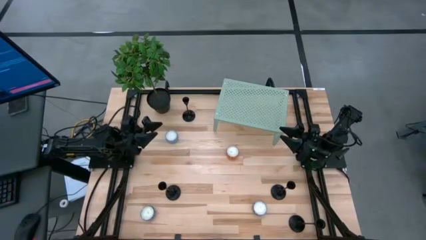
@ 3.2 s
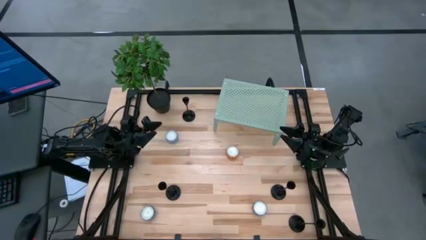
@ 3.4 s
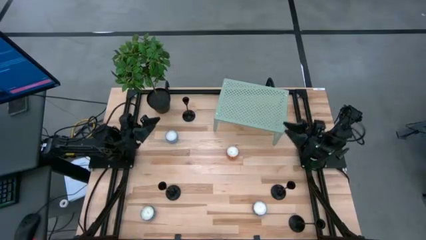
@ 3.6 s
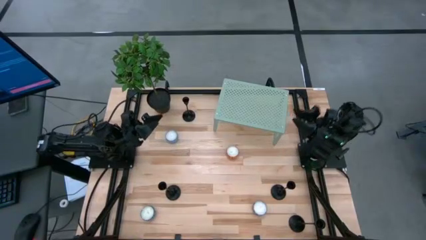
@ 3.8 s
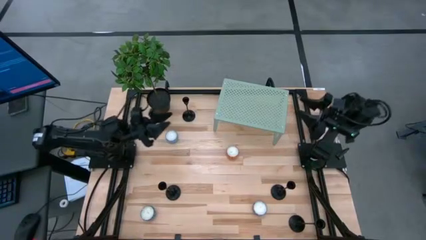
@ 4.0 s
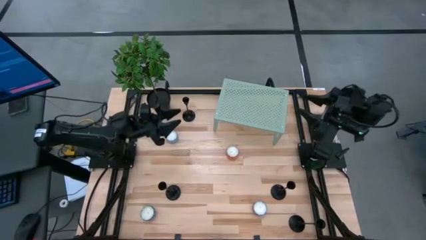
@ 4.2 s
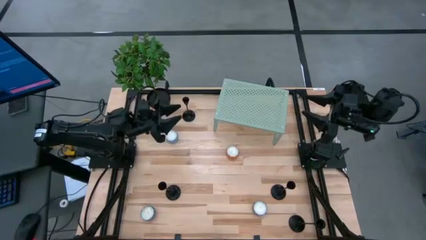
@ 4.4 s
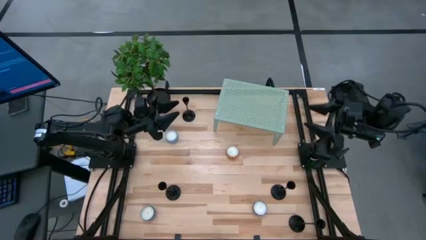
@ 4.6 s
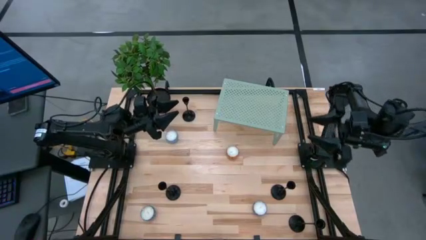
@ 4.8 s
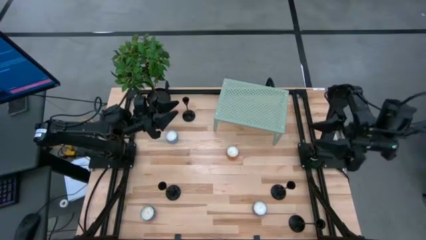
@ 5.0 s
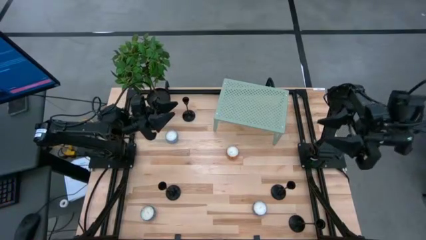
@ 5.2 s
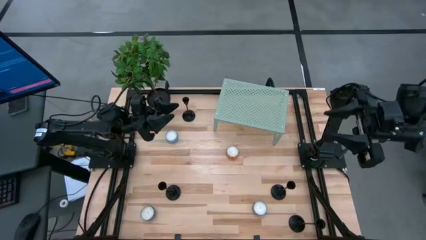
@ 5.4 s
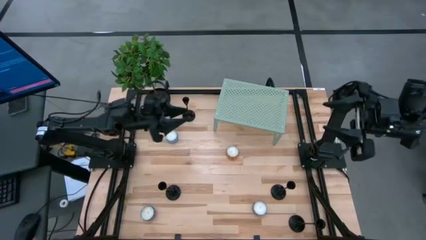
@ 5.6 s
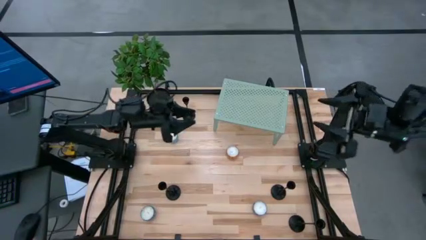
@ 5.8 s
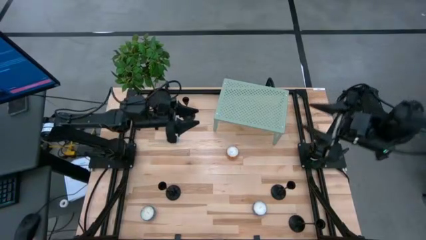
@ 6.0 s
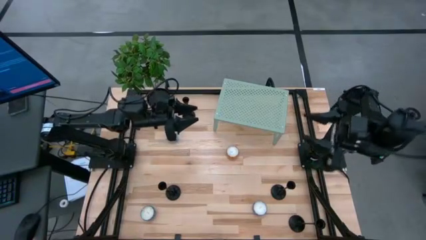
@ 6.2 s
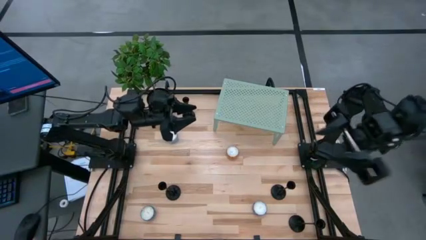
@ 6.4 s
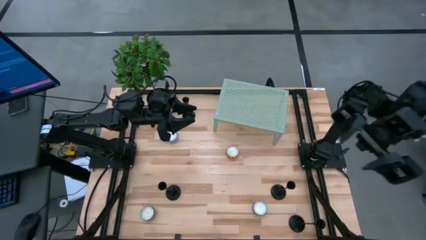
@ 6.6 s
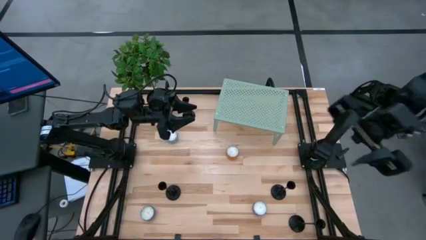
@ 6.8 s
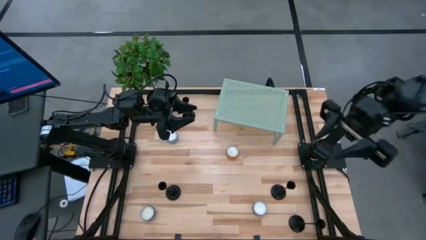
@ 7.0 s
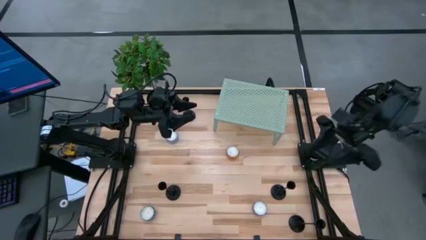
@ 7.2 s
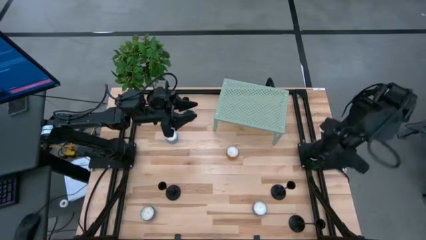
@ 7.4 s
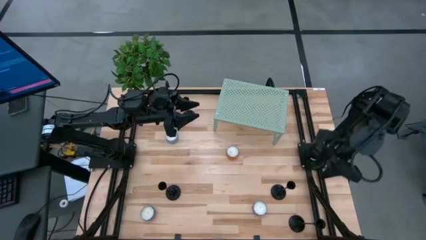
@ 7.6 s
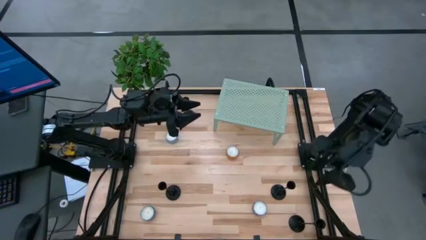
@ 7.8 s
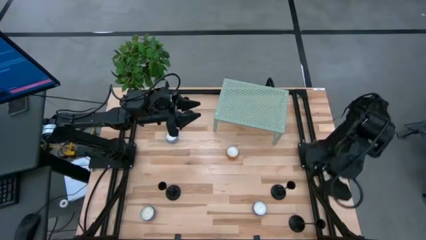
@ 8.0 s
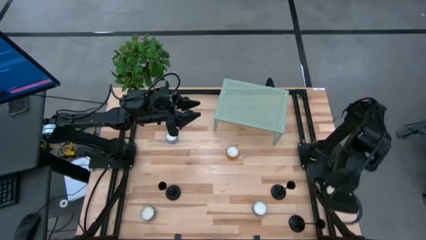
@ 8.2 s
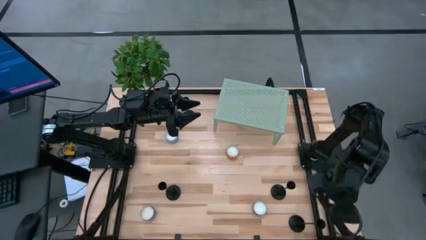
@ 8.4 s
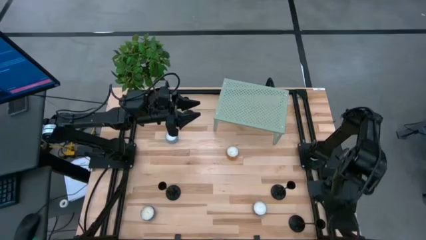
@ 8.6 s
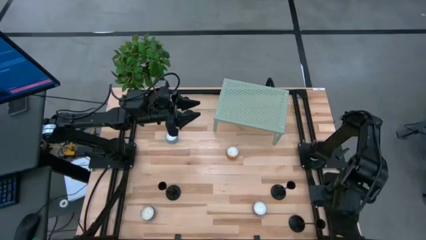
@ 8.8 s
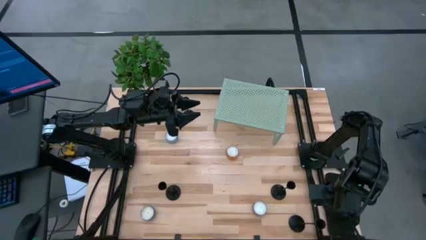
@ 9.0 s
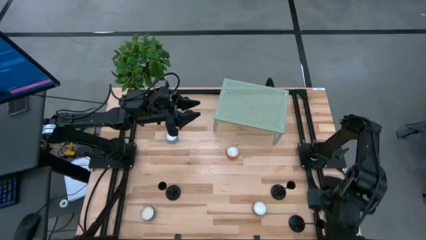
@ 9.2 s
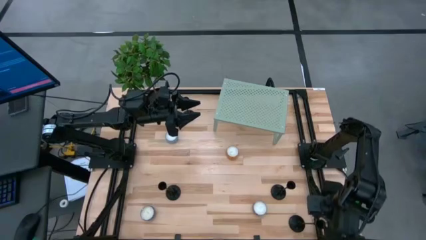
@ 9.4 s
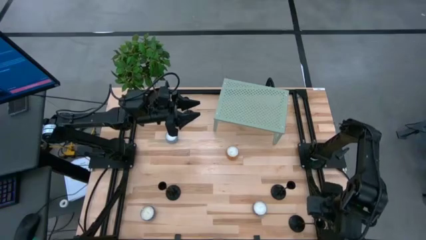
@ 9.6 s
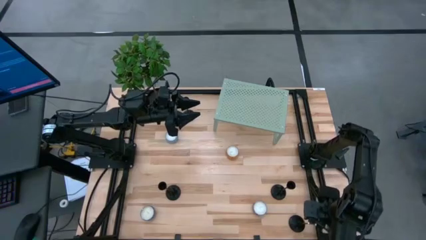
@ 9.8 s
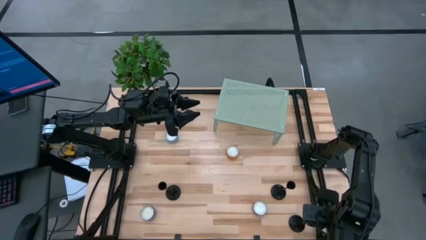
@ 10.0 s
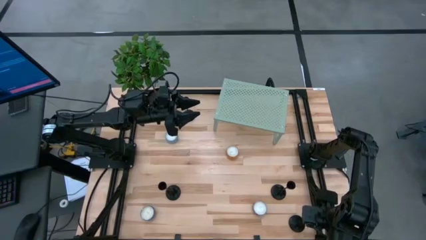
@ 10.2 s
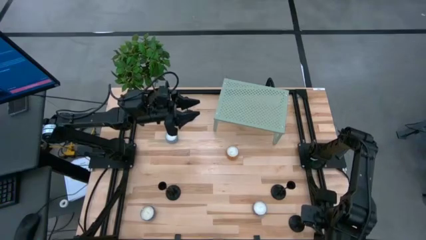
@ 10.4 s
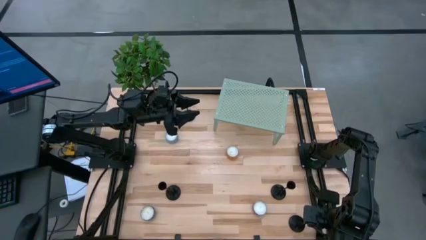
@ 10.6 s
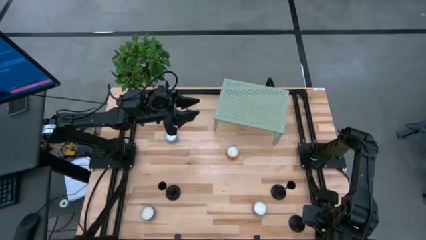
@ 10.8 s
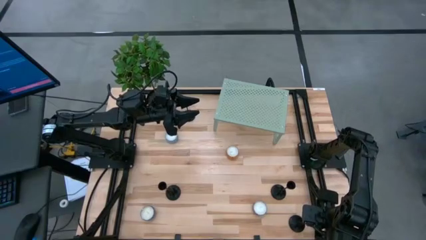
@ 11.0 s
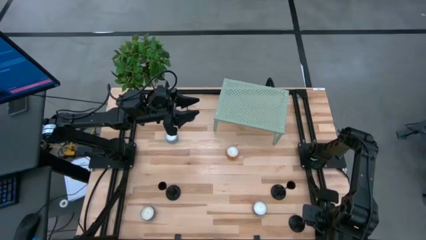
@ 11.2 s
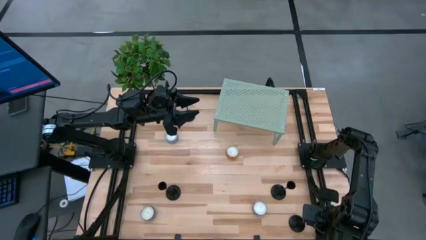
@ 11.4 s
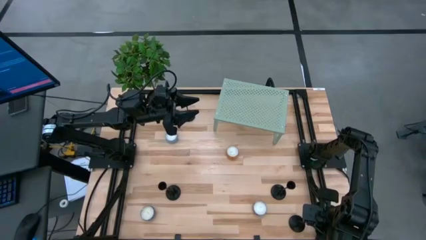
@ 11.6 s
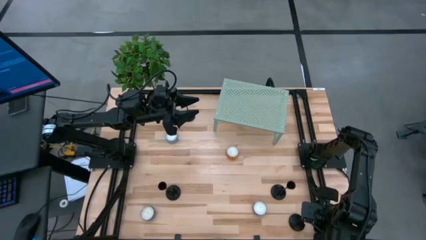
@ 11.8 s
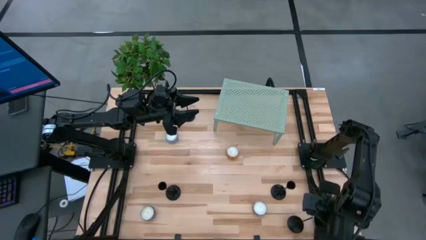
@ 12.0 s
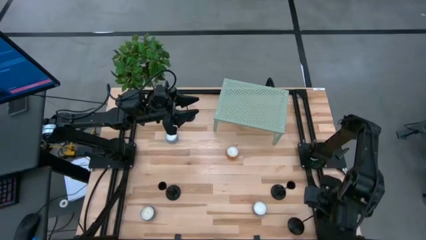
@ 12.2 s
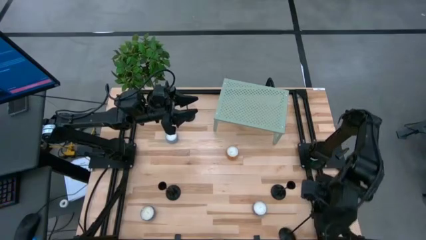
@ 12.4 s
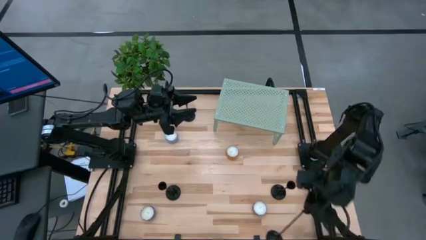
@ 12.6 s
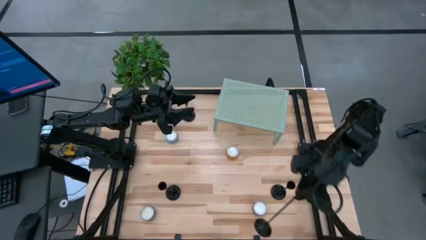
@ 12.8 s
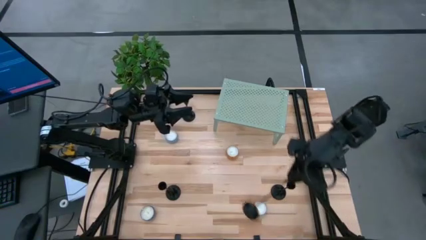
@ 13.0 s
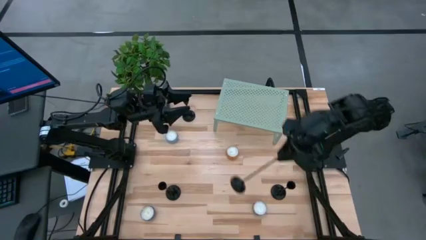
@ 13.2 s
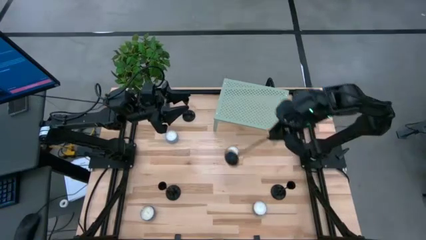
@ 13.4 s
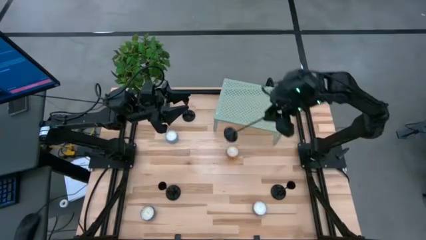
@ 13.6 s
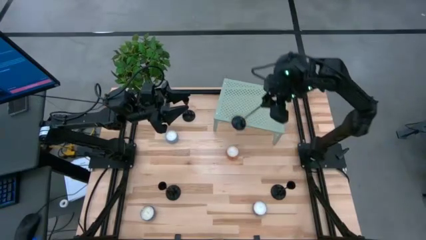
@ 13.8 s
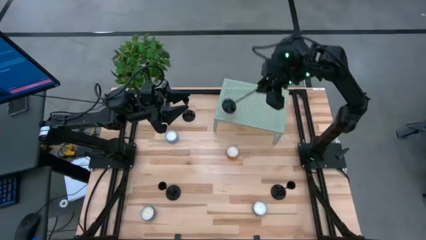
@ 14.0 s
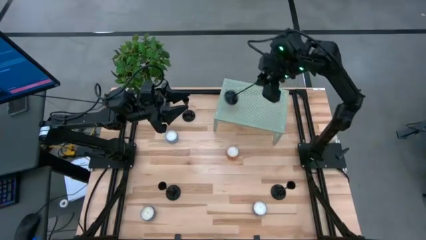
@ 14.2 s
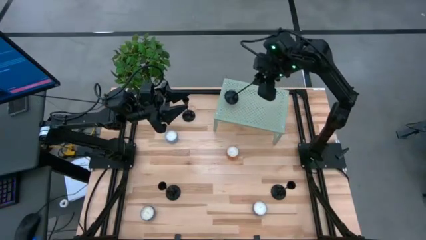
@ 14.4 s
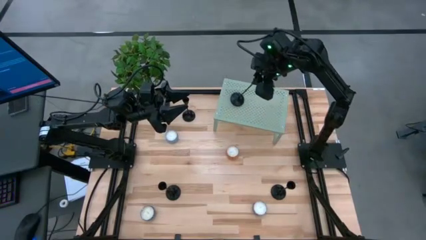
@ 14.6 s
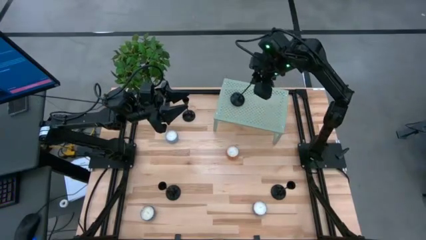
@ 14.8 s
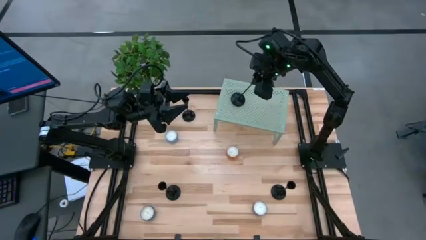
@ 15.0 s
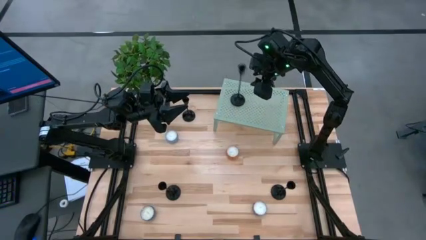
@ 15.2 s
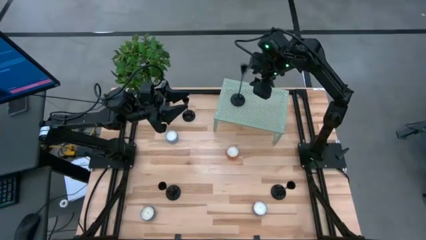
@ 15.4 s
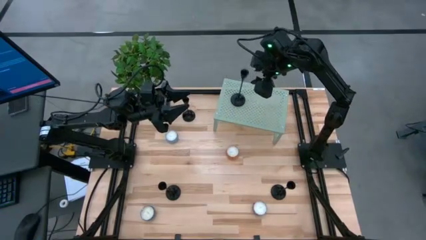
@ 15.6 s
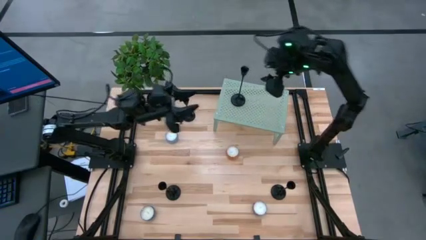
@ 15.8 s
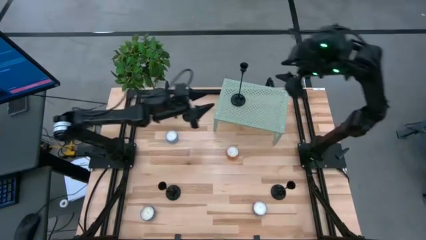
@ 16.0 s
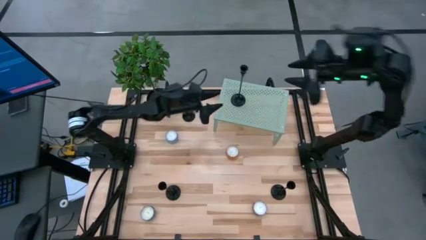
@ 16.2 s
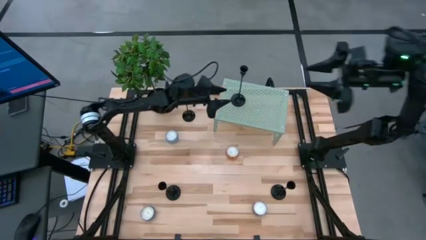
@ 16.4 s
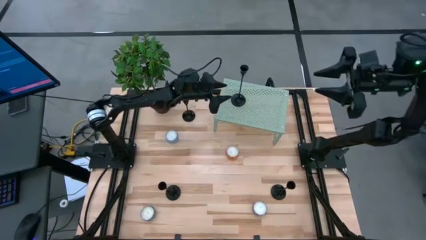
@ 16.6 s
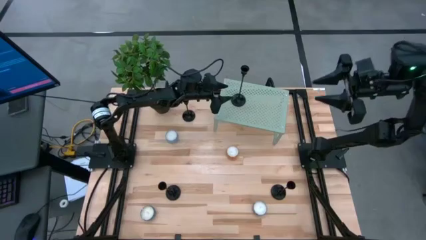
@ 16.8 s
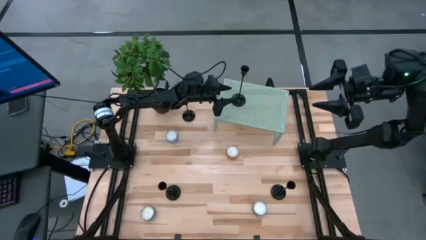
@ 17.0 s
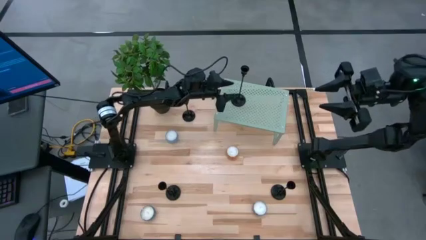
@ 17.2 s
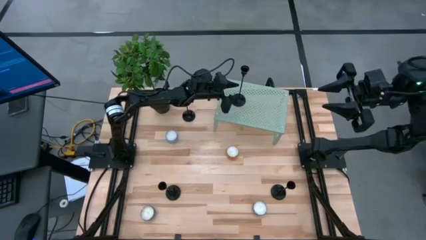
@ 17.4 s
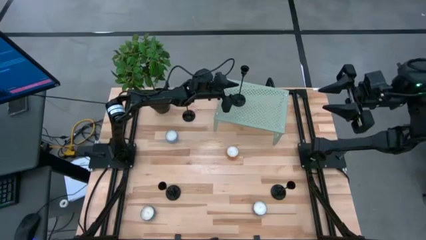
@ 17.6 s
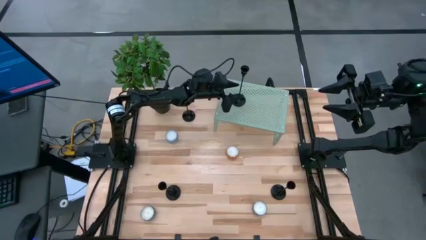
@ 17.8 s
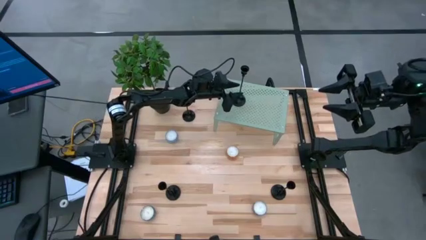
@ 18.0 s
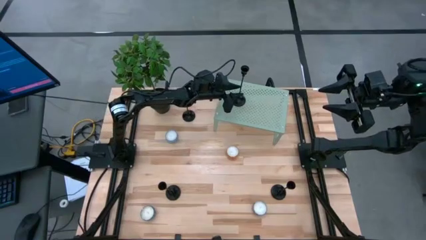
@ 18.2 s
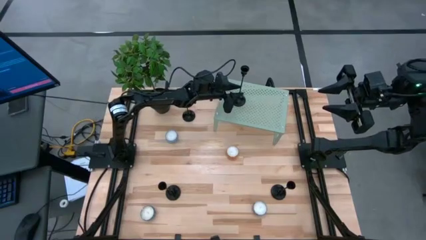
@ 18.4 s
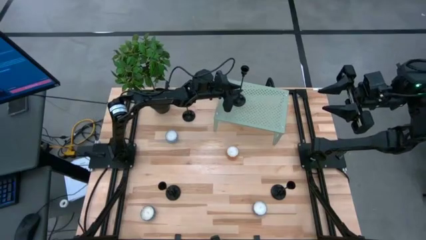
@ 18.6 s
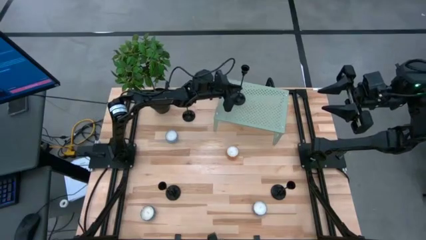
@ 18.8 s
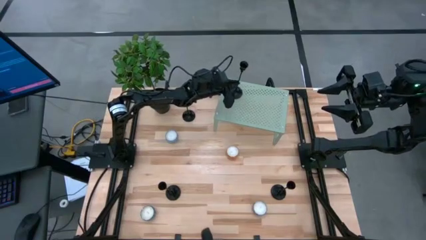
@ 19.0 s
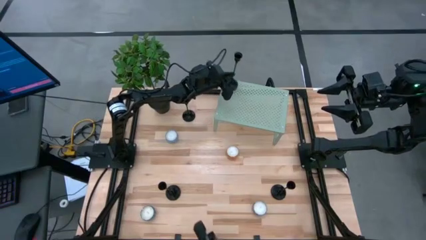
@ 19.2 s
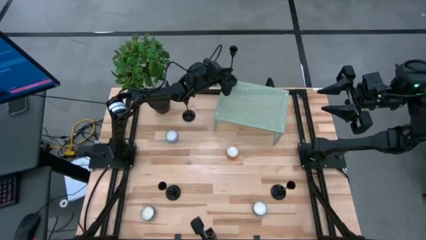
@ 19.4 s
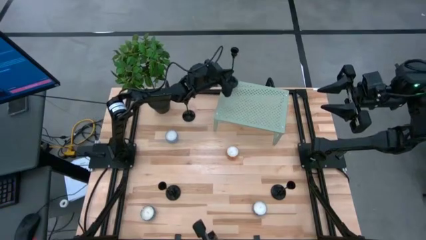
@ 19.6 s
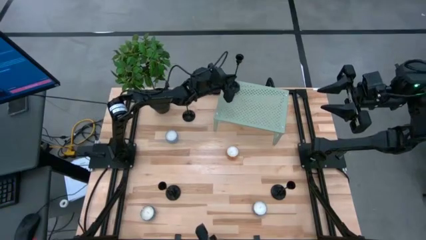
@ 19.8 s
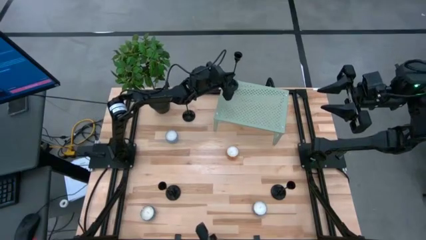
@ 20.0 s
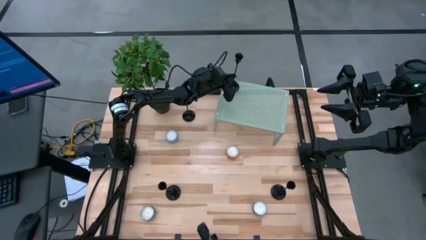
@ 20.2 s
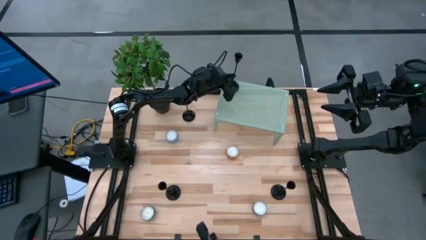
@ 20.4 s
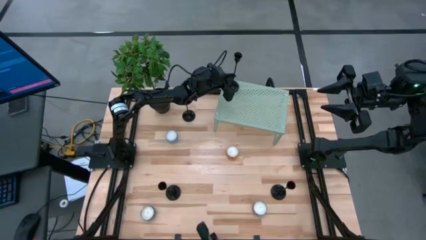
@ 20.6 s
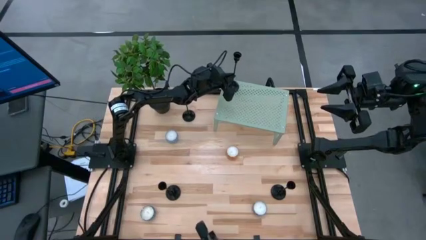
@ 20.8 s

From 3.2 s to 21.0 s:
Task: Pick & Place candle stick holders
Put the candle holder on the shelf
